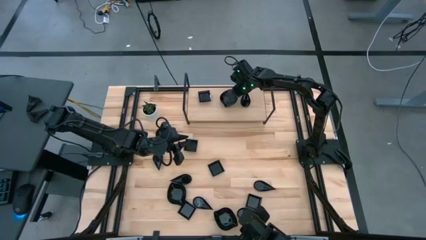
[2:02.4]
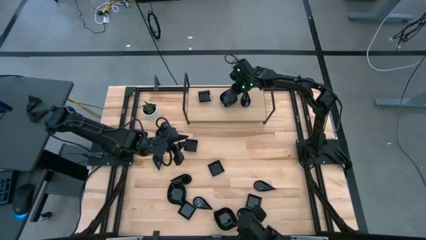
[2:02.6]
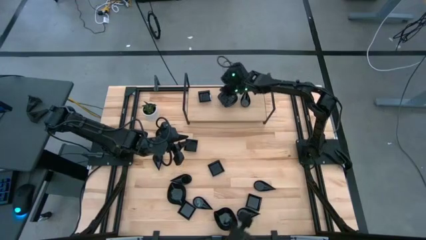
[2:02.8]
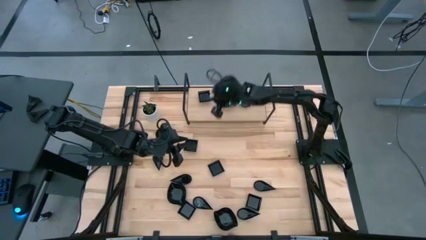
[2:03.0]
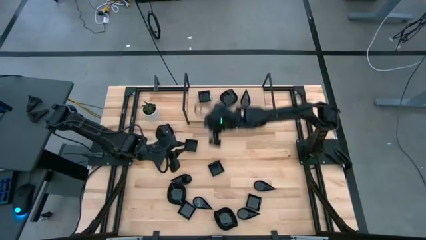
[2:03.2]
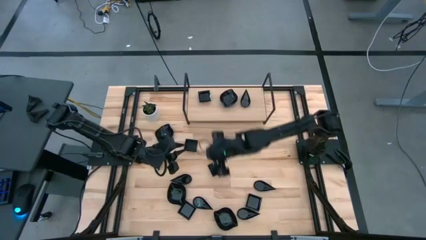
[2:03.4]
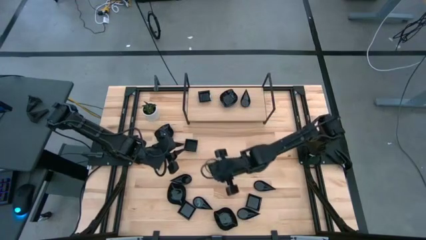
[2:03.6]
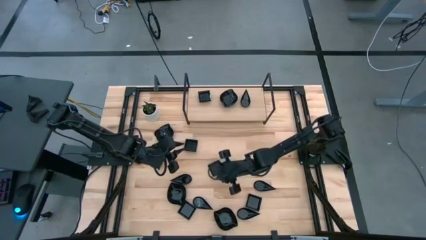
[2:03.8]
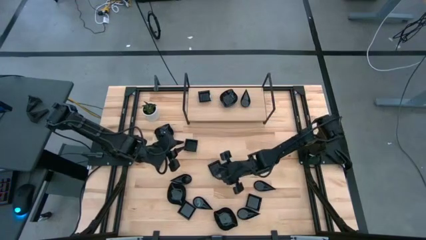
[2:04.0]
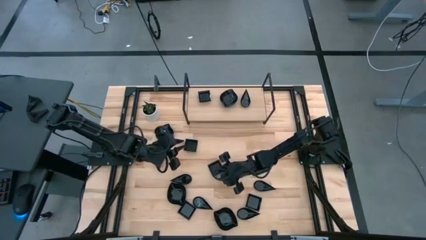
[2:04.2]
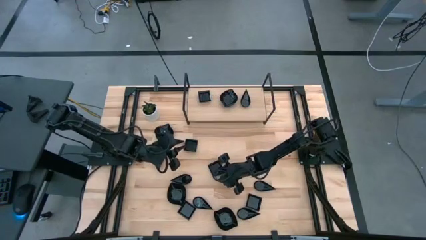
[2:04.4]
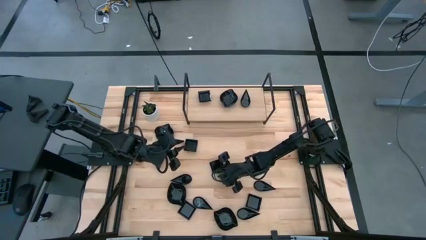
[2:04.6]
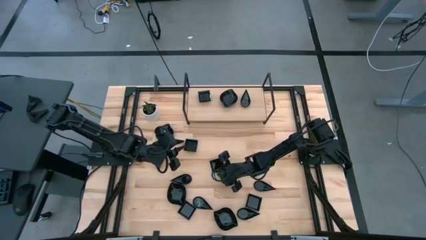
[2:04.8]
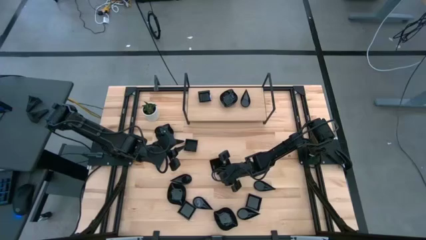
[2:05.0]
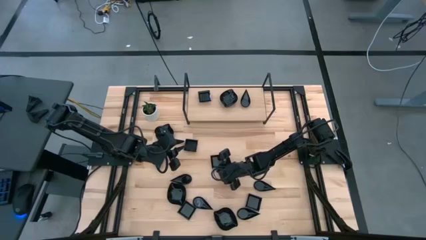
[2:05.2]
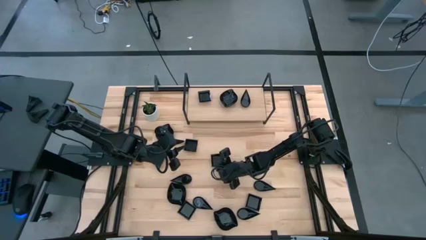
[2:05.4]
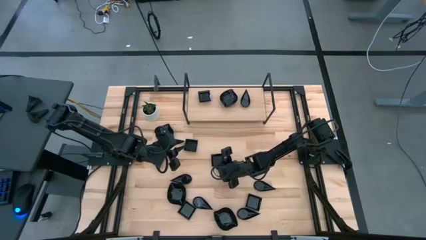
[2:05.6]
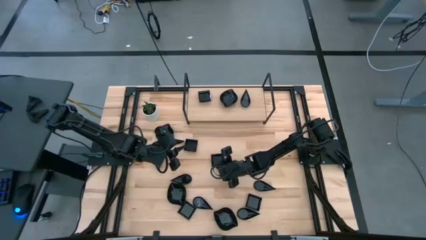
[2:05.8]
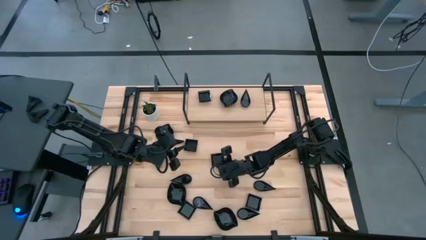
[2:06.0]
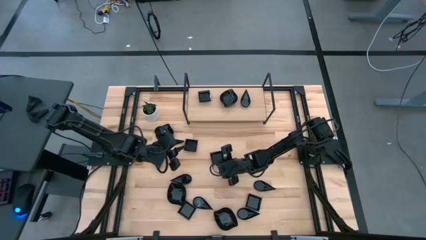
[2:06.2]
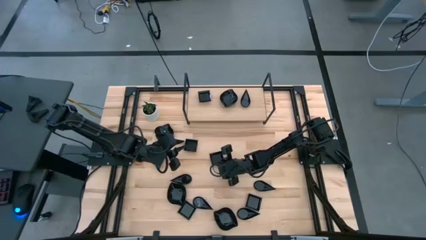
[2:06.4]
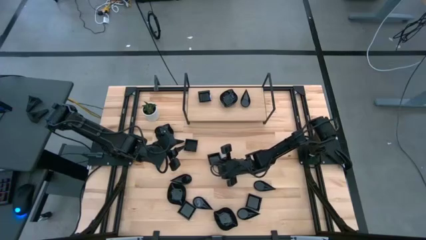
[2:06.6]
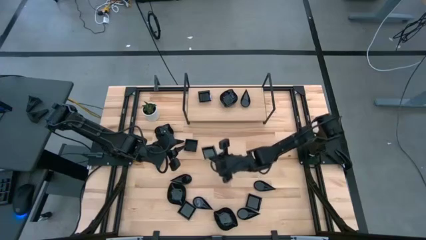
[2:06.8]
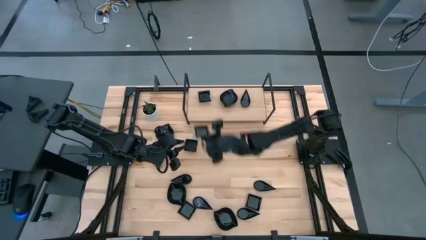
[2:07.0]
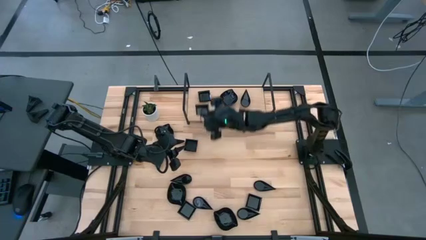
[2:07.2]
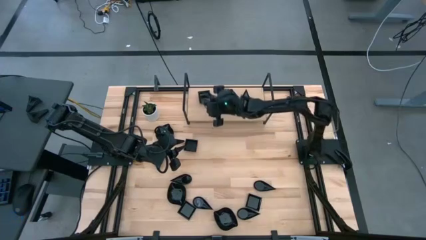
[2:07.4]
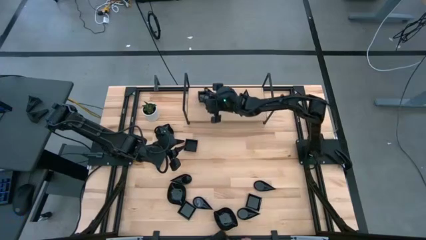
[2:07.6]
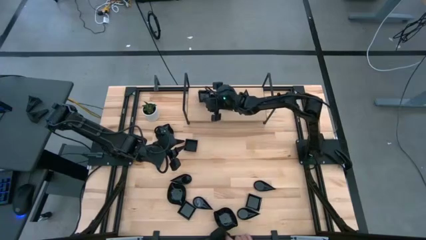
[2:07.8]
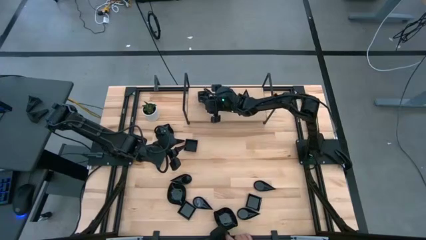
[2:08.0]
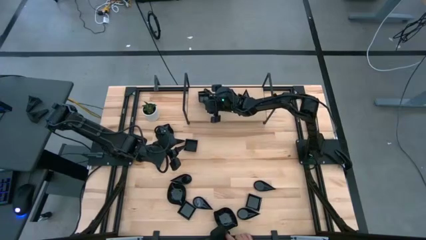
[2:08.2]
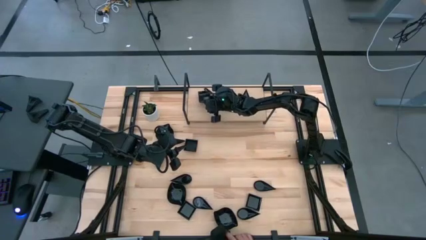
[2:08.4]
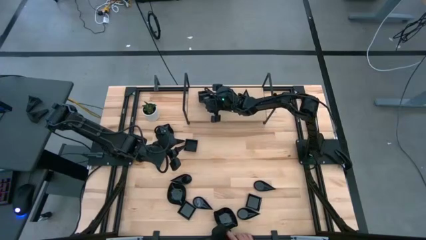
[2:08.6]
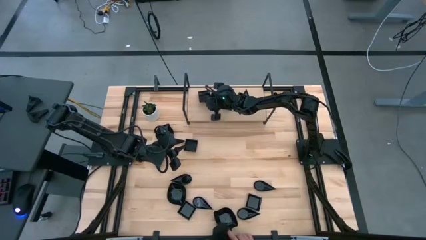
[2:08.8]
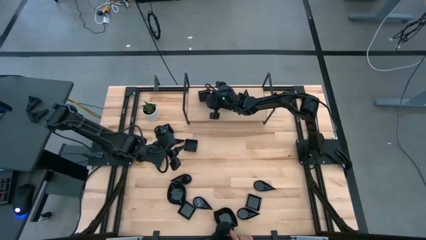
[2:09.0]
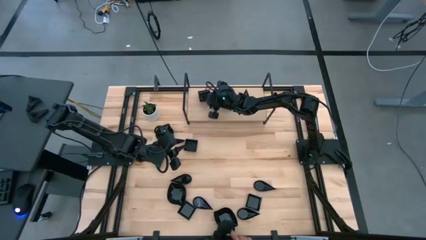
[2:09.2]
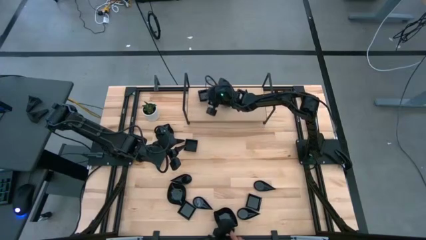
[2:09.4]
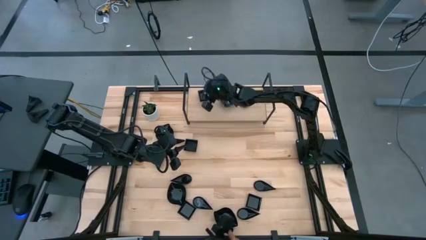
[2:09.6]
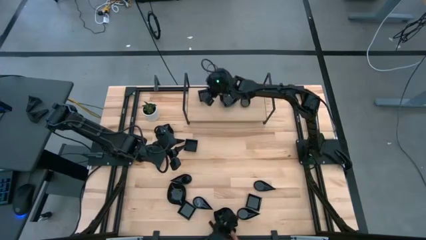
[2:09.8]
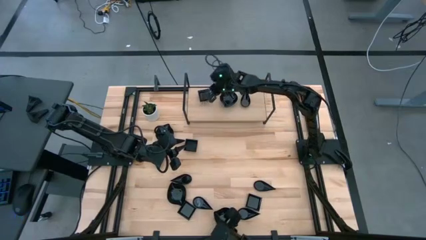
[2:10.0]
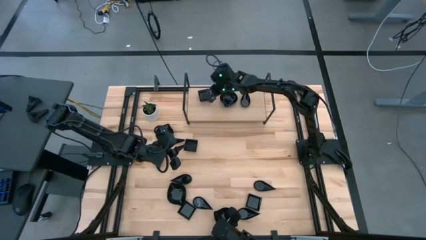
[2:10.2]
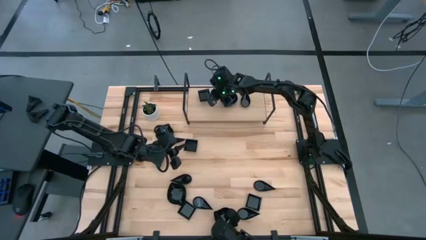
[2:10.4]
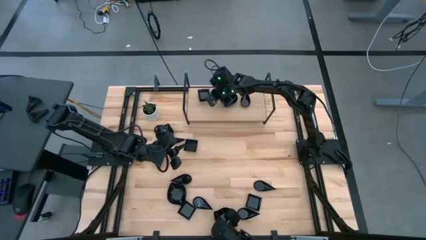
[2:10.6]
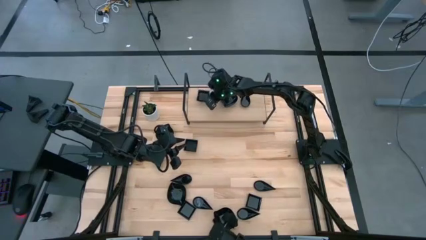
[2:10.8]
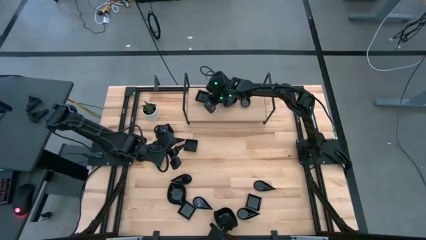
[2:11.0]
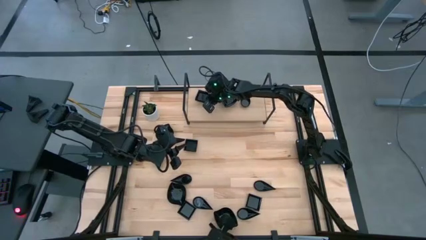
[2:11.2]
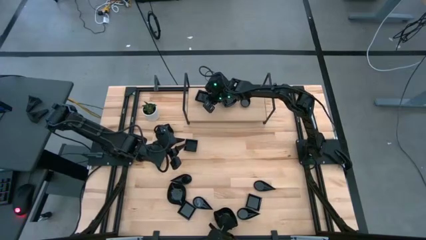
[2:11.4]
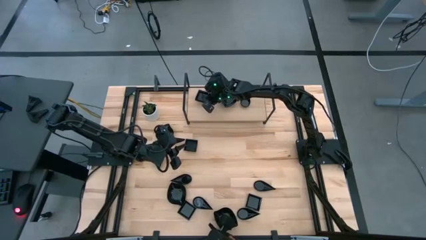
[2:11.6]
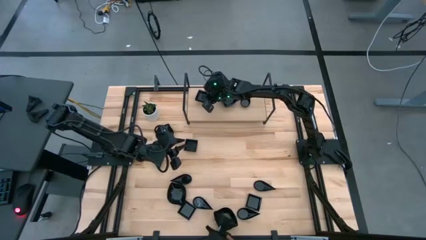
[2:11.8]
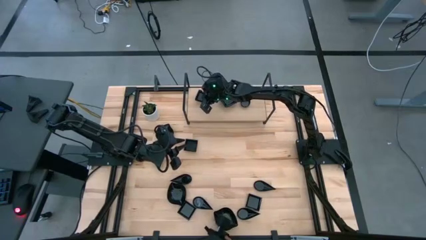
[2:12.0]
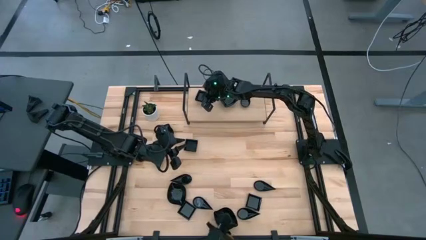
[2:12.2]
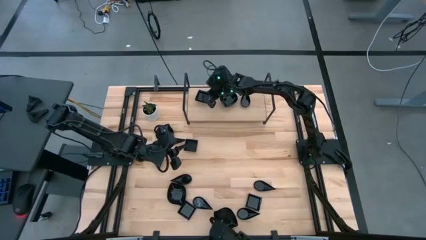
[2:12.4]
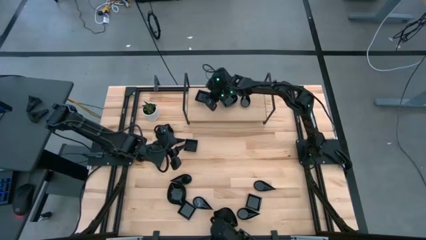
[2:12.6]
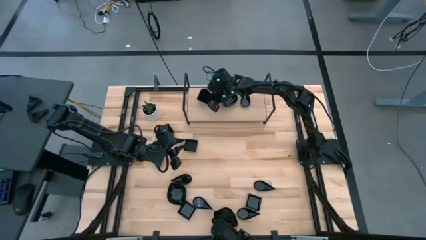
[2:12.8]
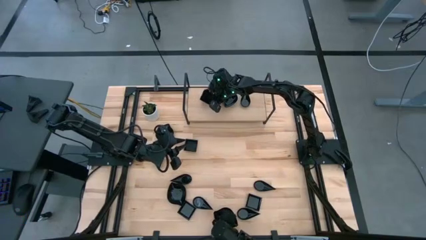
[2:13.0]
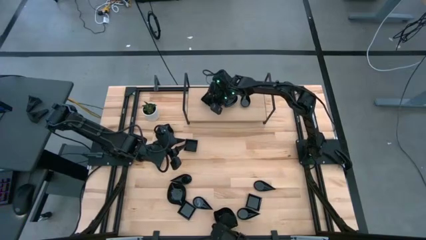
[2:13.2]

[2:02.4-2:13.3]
Task: Pick & Place Mini shaped plates
Stack the black square bowl on top of the other black square bowl on the shelf

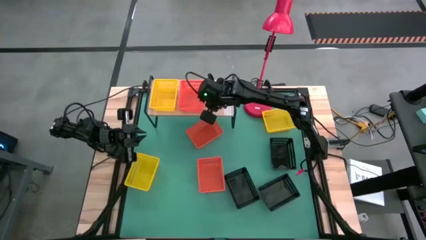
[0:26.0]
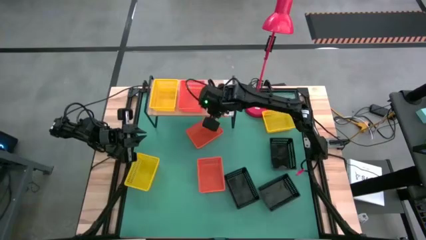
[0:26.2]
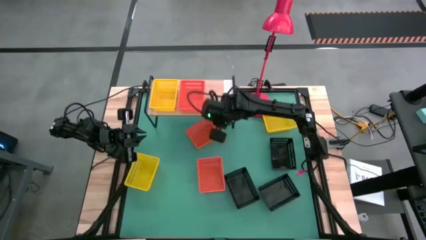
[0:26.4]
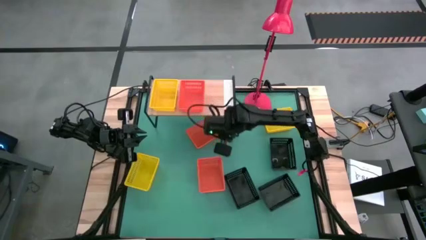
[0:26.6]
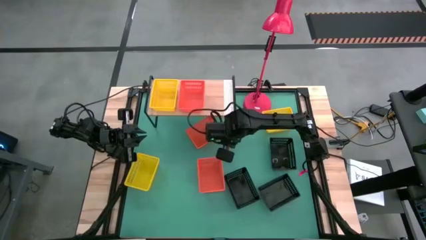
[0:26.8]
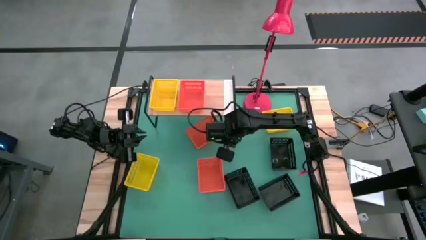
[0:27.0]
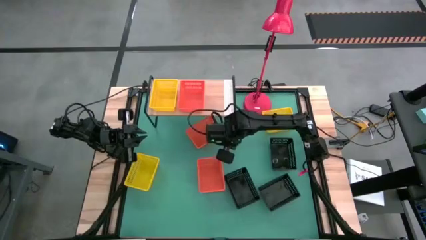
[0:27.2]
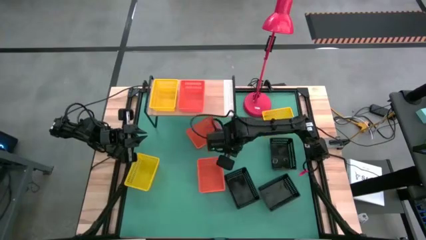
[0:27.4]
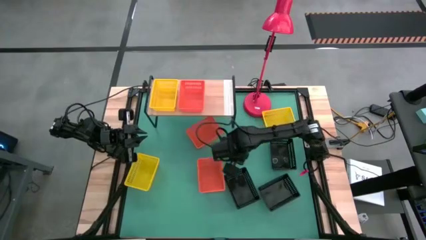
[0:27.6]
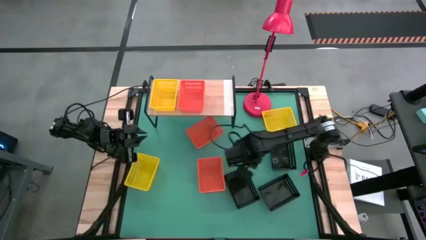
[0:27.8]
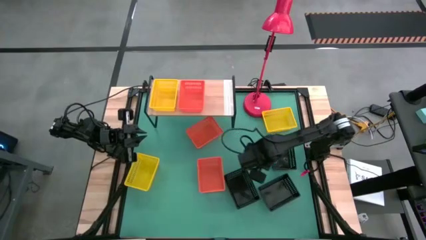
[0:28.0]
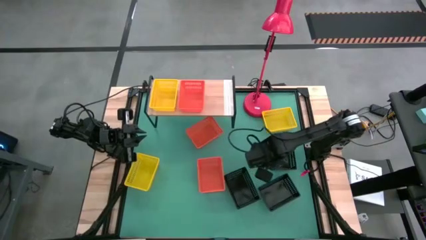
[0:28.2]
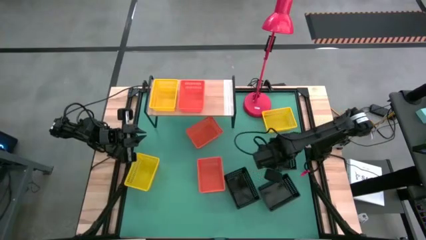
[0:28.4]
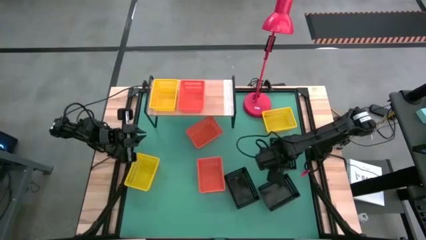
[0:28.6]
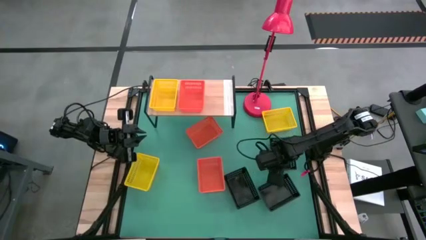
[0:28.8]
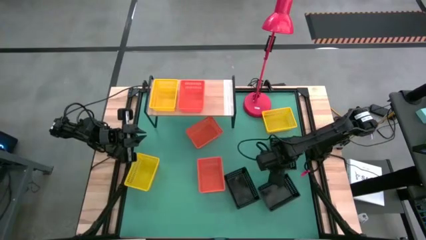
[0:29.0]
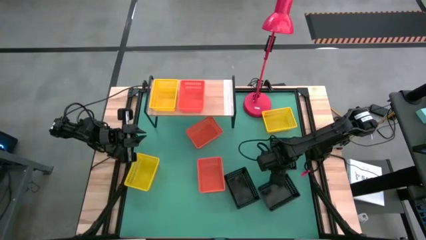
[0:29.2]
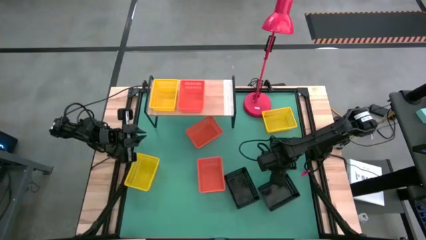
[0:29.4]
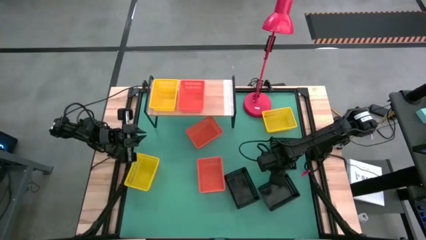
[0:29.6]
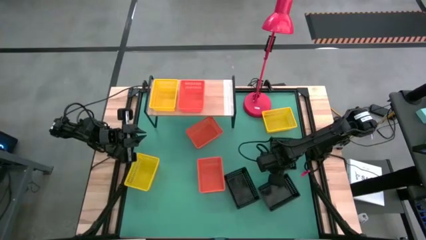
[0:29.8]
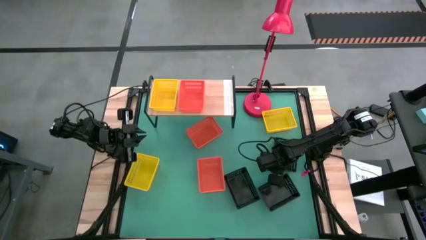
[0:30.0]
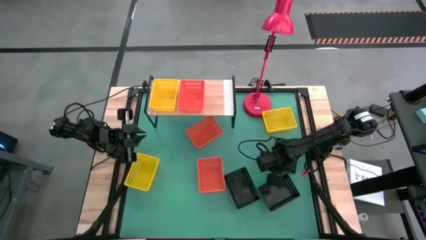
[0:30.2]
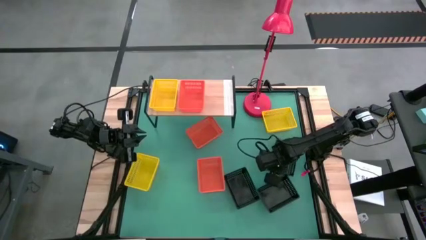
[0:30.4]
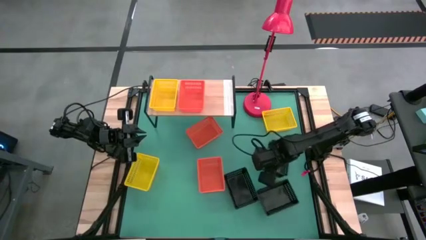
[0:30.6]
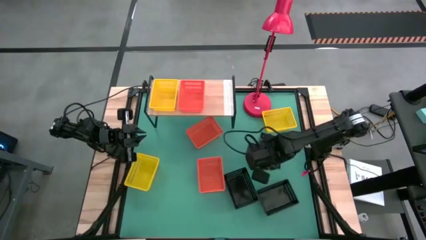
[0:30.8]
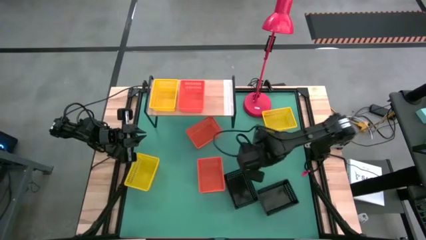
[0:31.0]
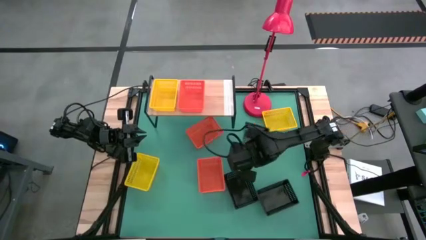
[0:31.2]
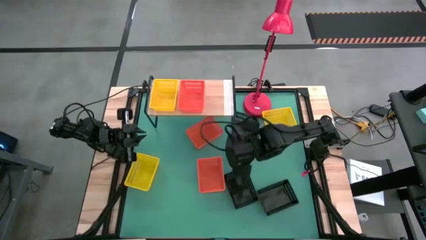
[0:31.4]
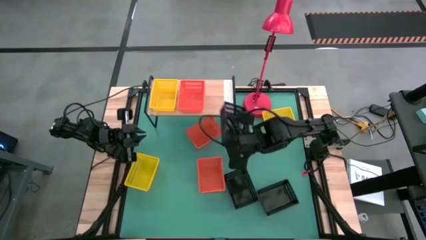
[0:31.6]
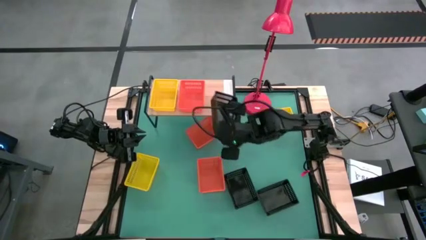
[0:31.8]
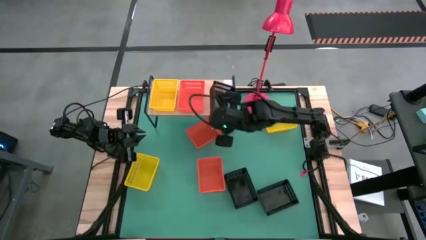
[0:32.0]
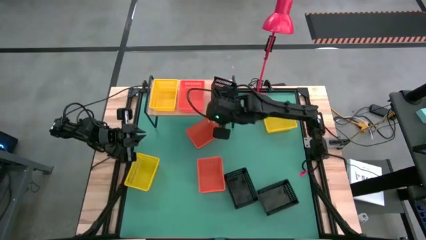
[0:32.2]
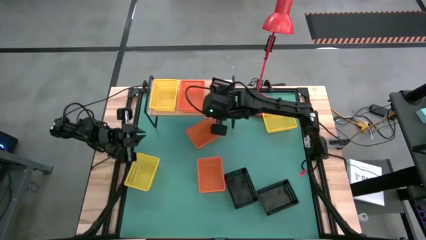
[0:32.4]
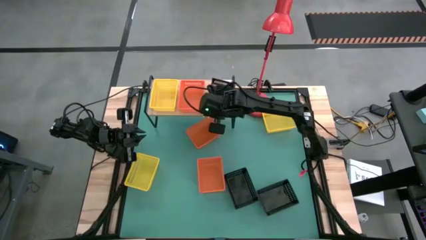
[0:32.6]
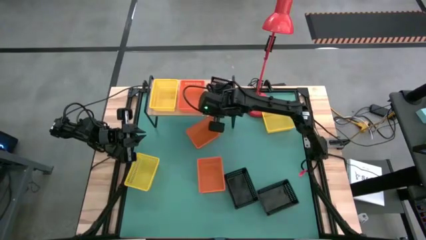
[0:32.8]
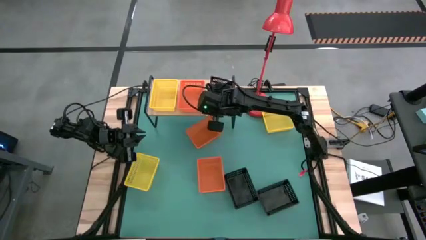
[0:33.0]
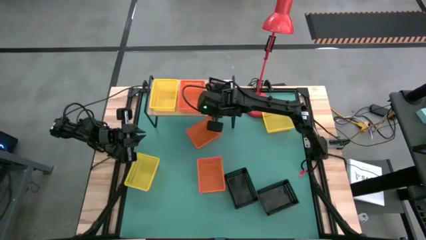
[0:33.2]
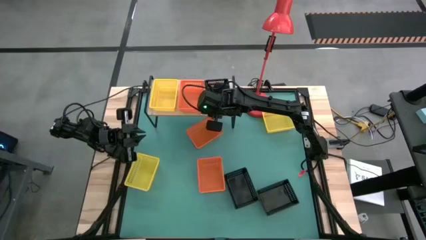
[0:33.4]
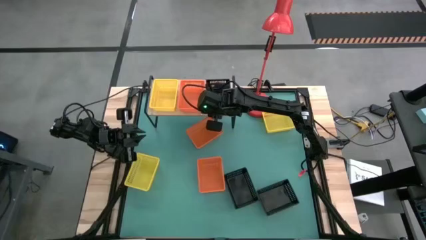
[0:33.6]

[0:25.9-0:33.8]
Task: Stack baskets on shelf by color
Put the top black bin on the shelf
